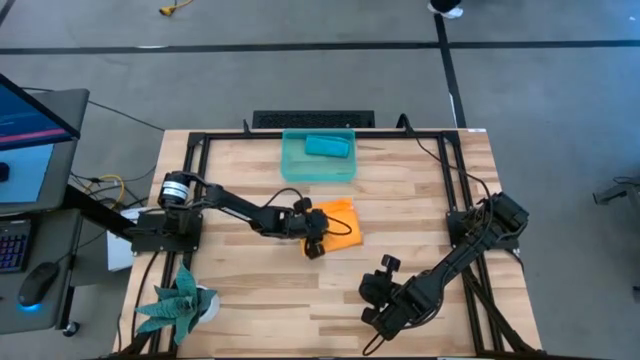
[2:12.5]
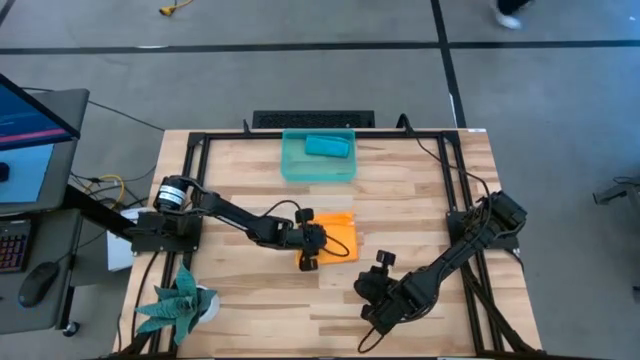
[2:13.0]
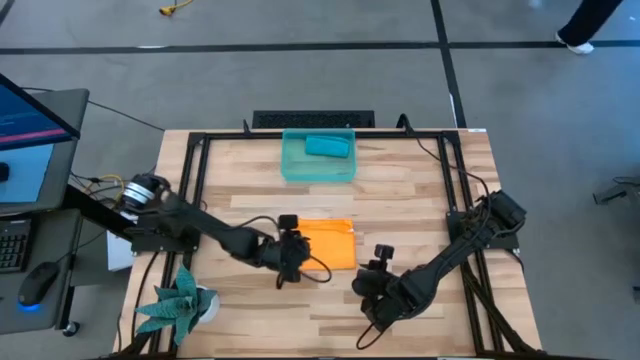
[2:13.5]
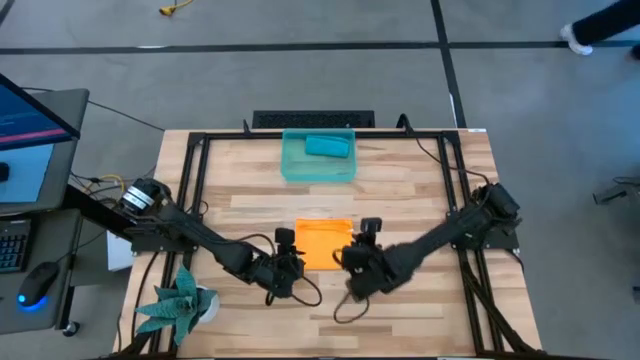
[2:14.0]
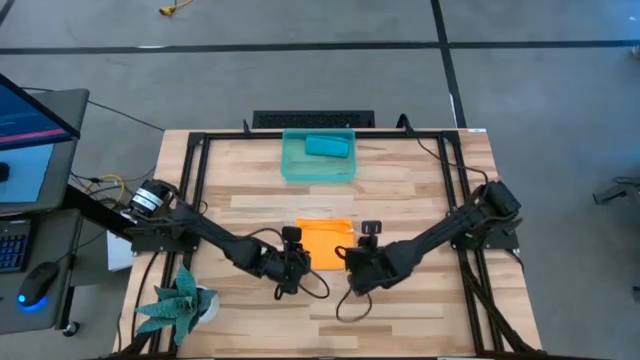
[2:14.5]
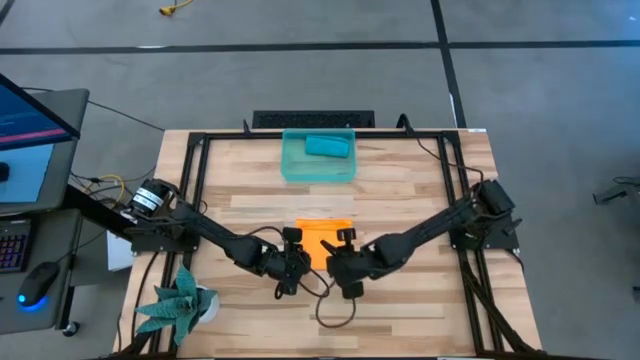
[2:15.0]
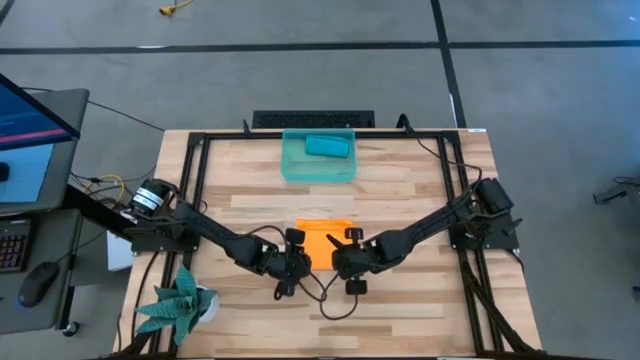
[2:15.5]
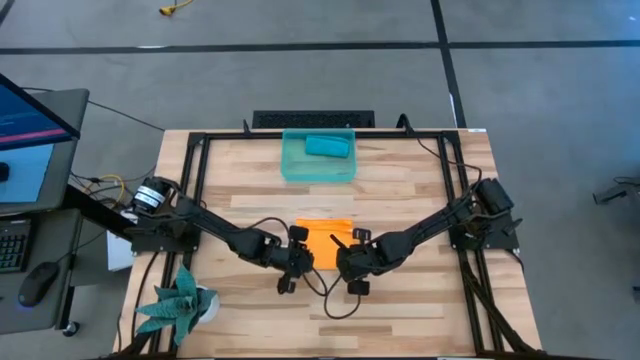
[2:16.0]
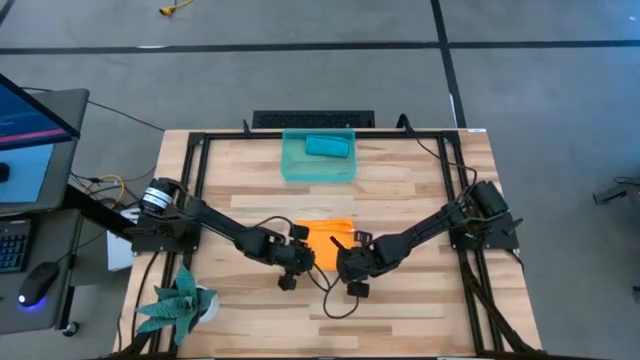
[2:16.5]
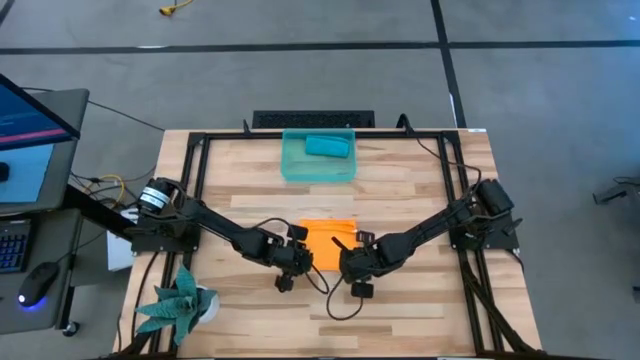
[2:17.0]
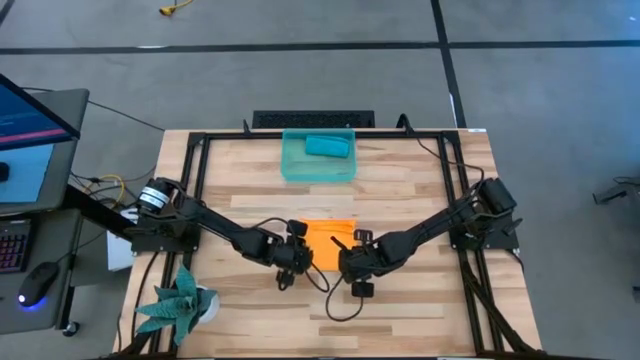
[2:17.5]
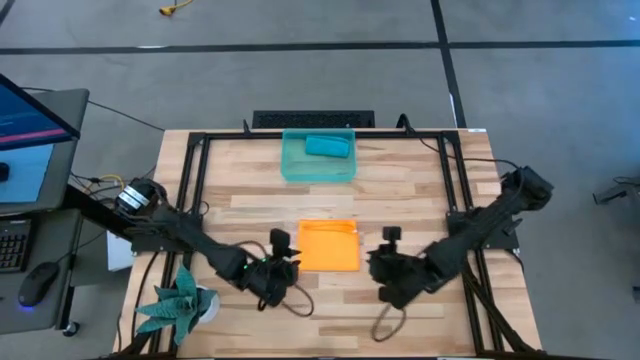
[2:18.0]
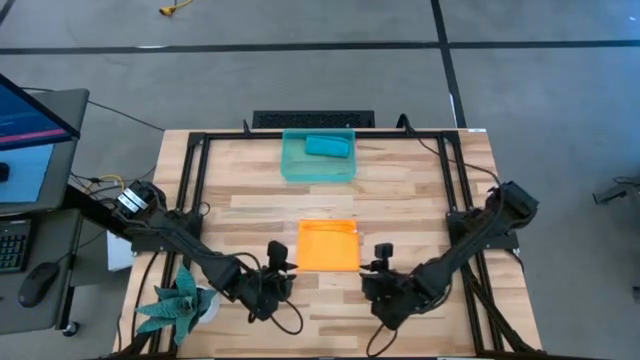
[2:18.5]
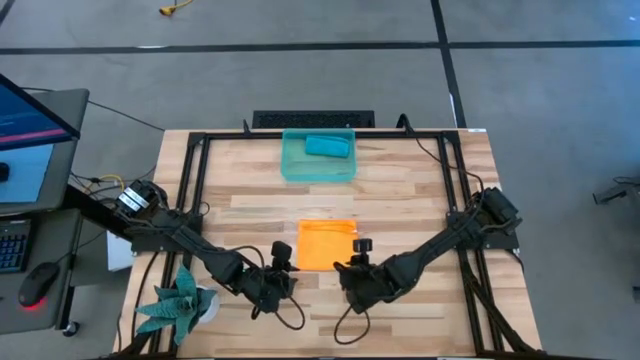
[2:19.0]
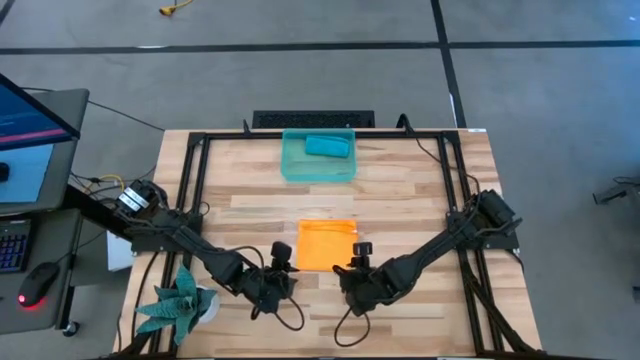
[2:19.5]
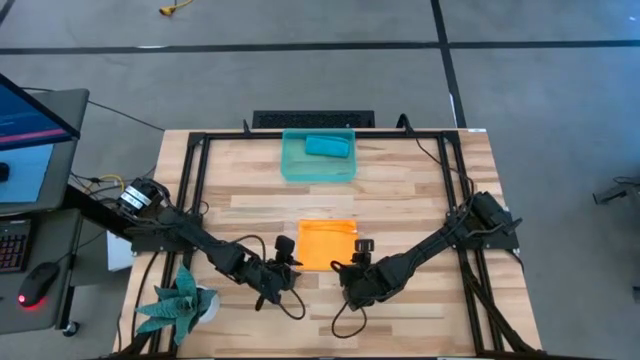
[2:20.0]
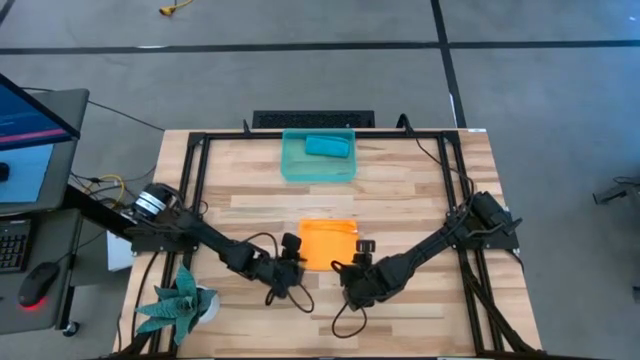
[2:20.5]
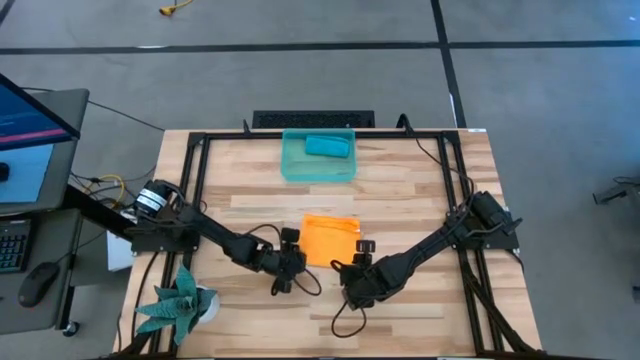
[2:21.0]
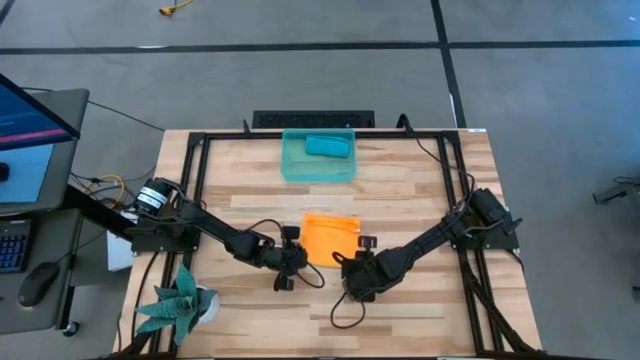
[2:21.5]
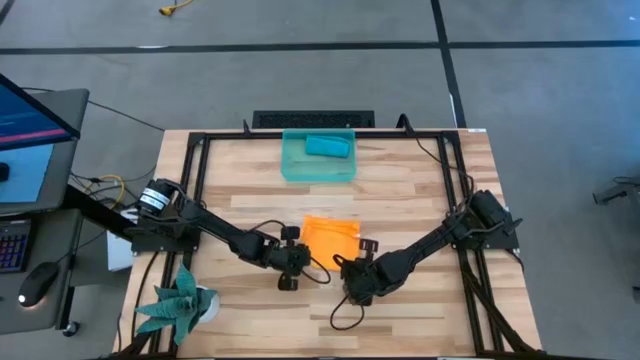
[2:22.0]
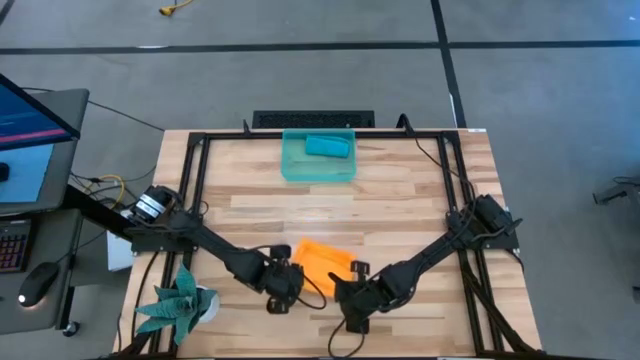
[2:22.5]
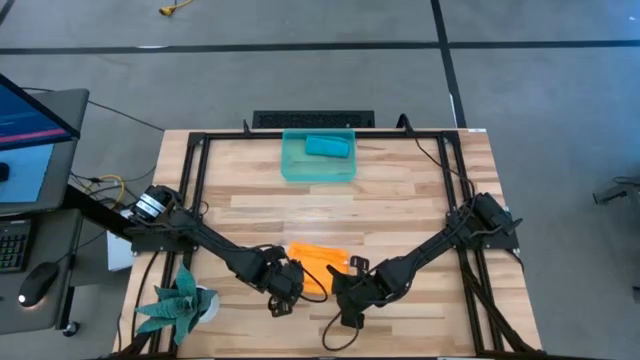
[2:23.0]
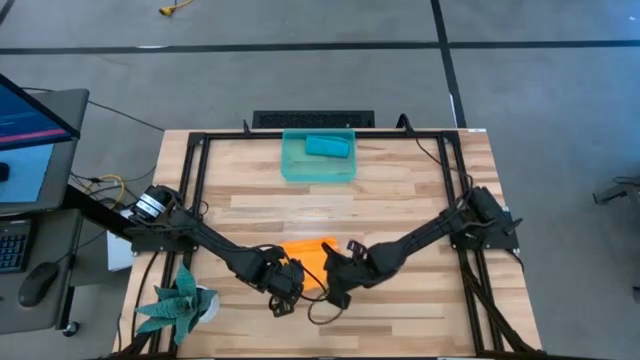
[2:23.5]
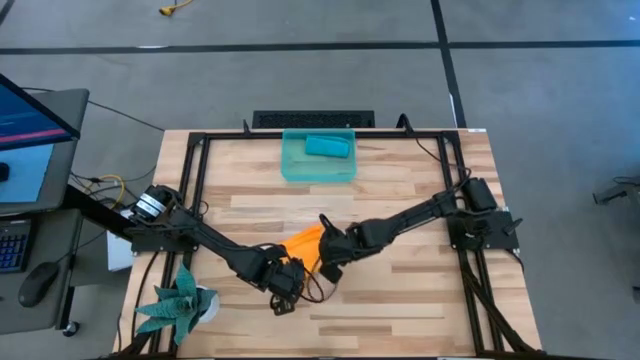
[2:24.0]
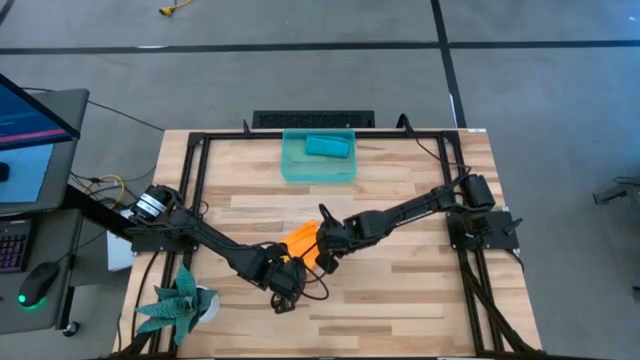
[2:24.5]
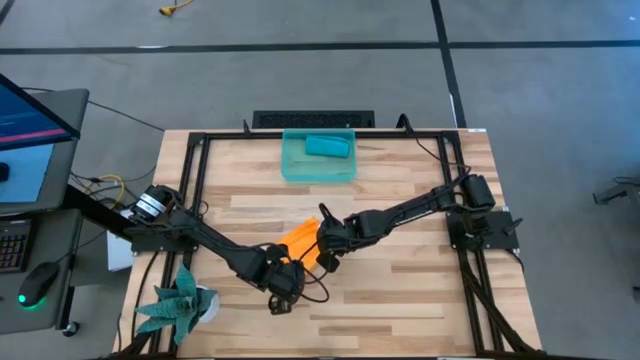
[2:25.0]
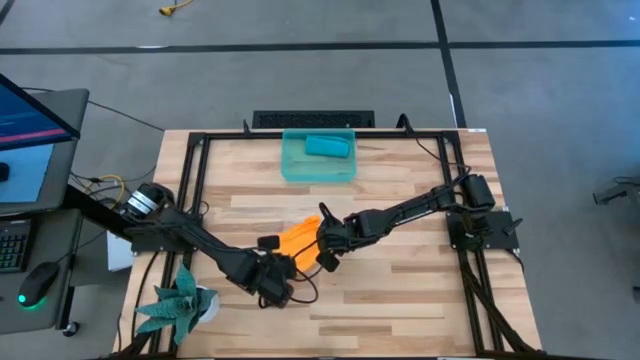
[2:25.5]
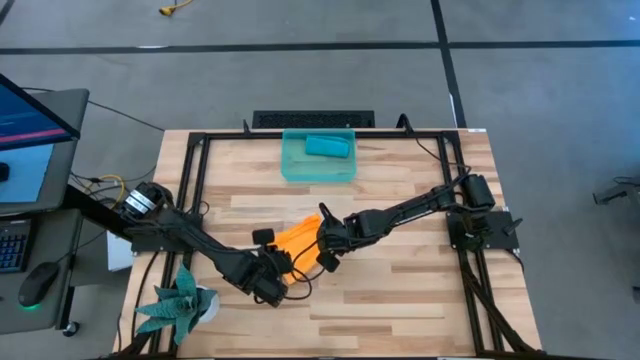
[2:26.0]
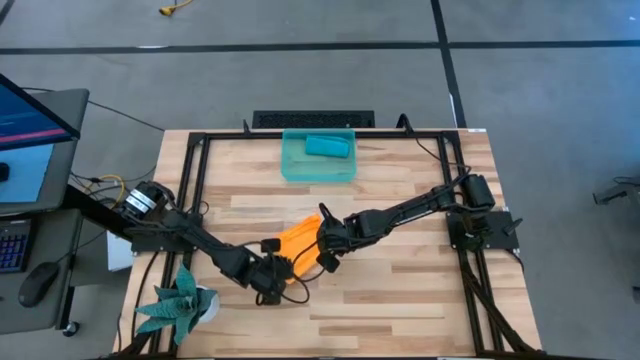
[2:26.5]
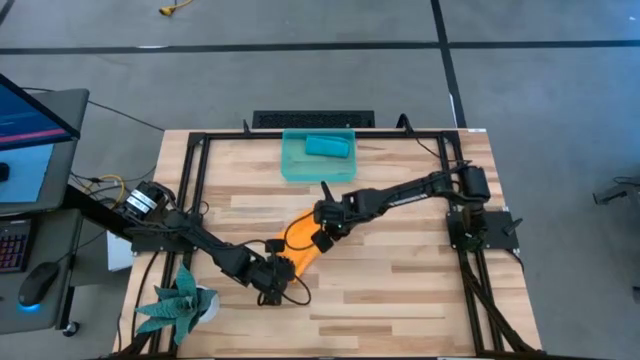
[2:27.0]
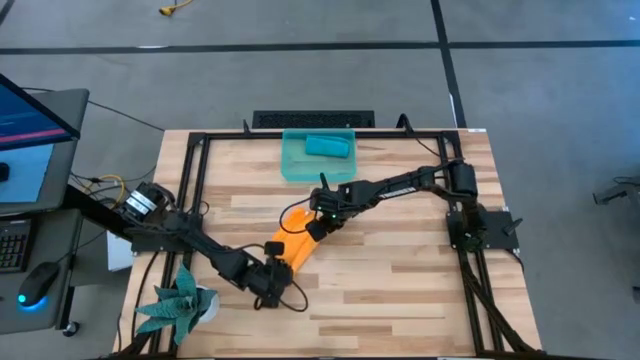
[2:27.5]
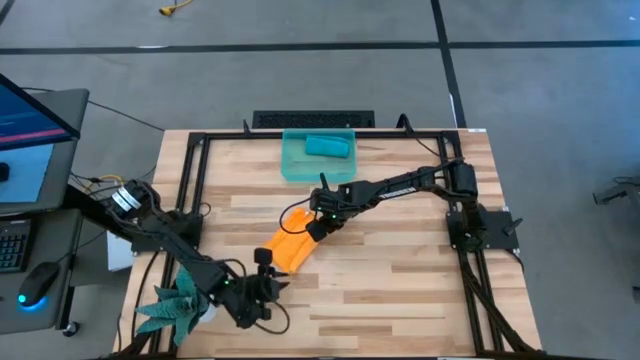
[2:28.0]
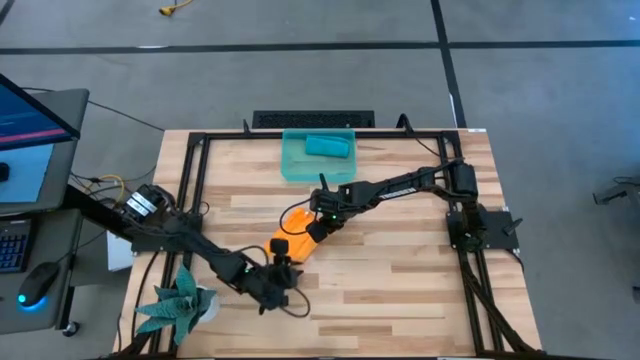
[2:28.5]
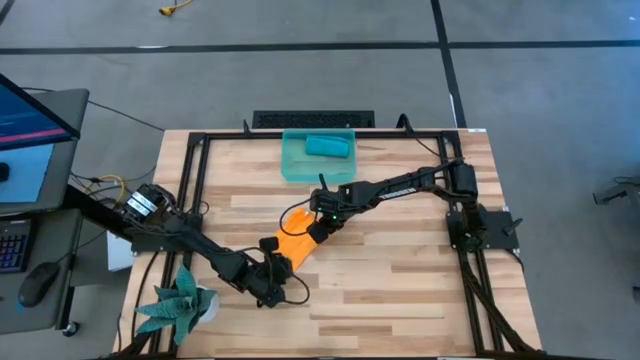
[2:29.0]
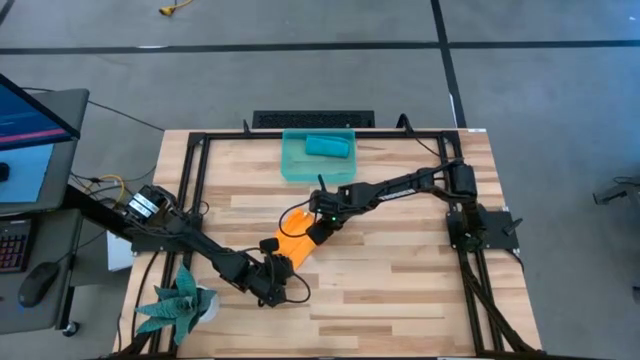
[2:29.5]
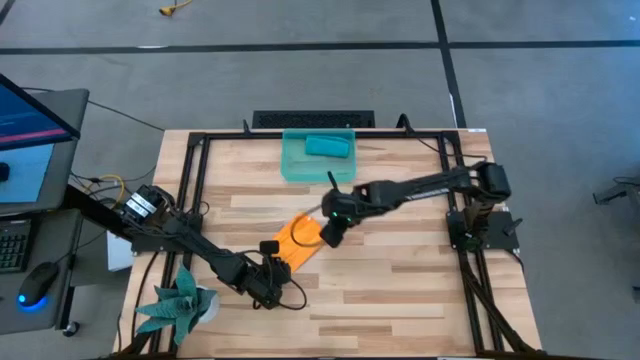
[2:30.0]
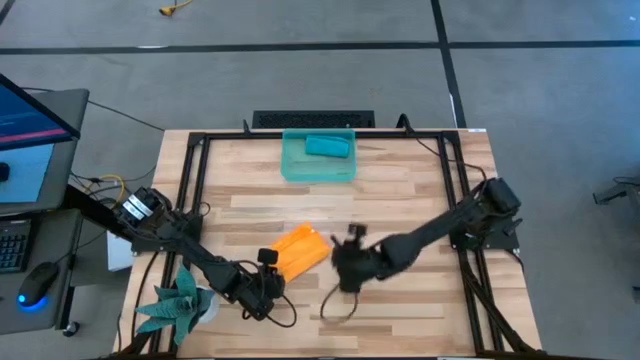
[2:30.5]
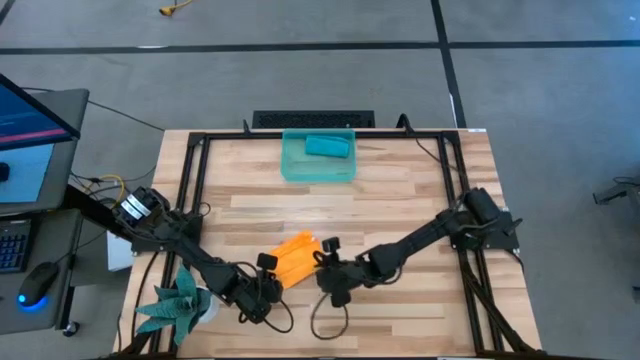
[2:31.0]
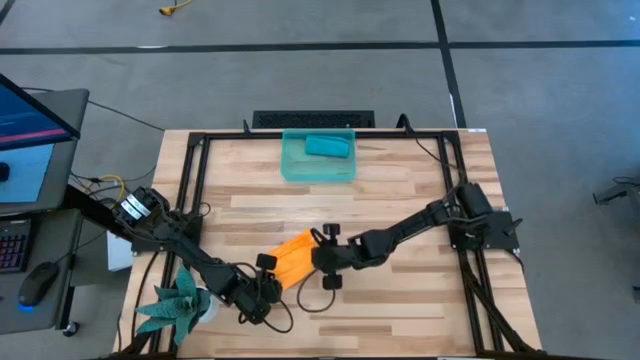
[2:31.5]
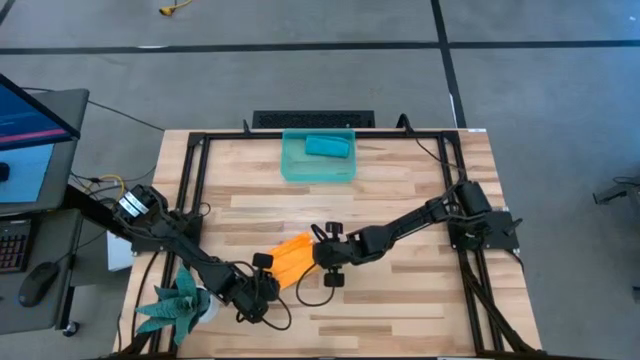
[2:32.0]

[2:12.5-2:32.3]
Task: Roll microfiber towels into tight, uniform cylinder then place into a basket
Roll the yellow microfiber cloth
